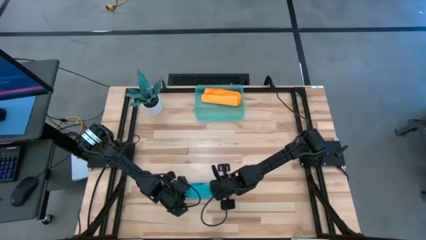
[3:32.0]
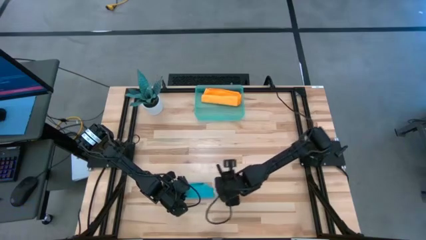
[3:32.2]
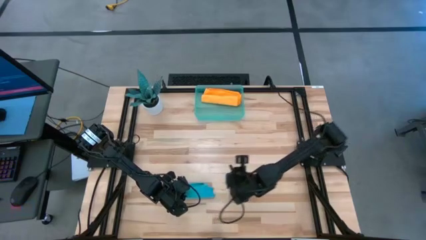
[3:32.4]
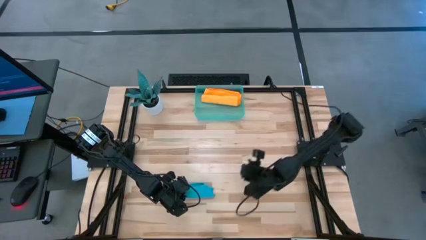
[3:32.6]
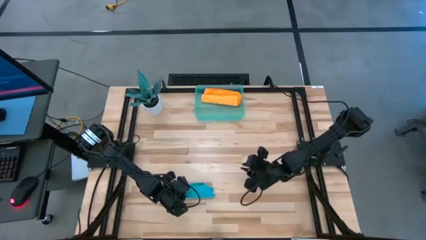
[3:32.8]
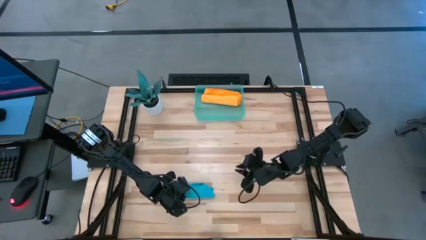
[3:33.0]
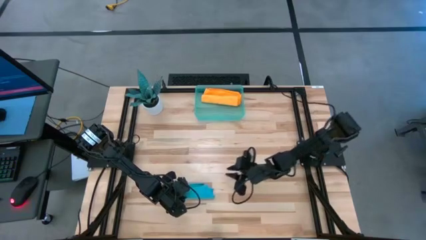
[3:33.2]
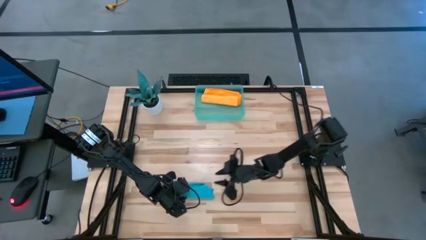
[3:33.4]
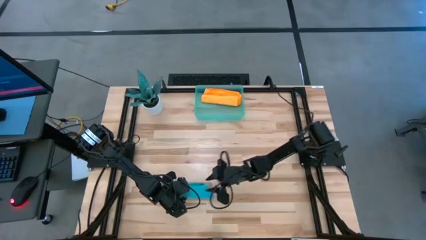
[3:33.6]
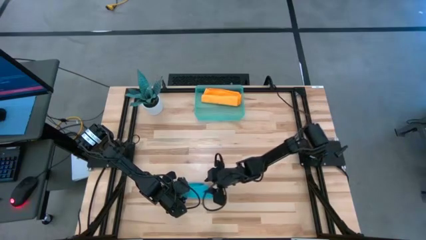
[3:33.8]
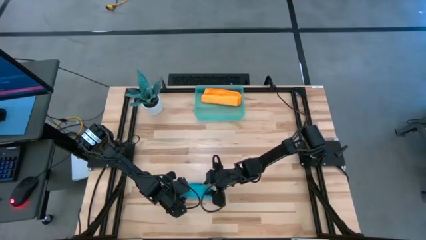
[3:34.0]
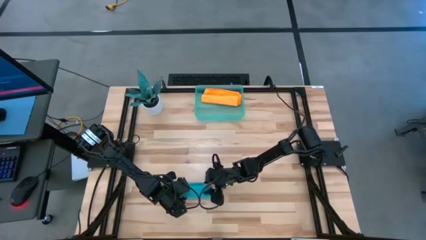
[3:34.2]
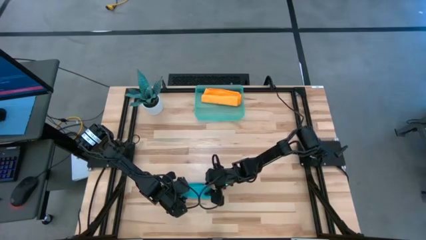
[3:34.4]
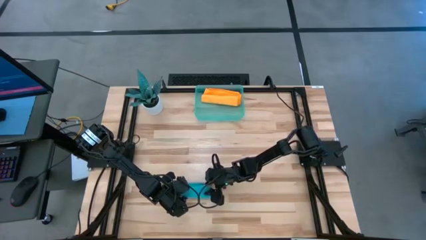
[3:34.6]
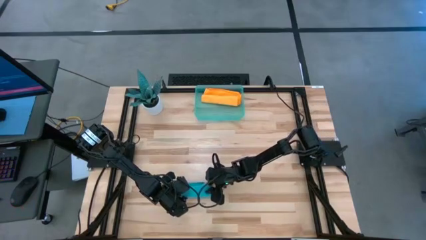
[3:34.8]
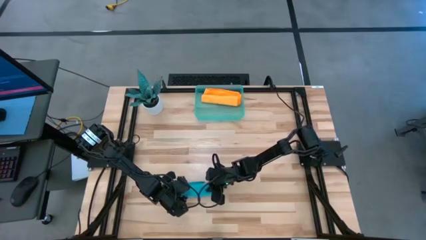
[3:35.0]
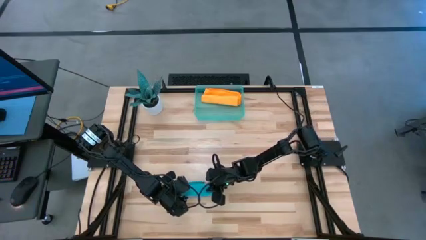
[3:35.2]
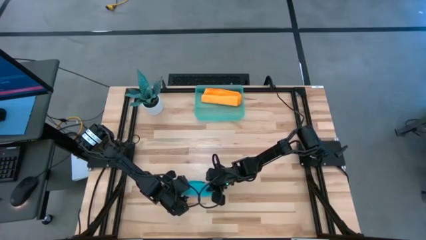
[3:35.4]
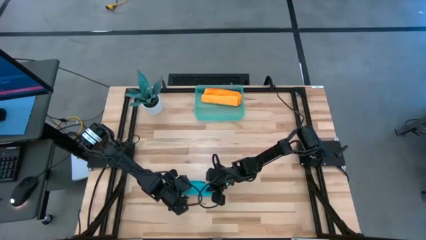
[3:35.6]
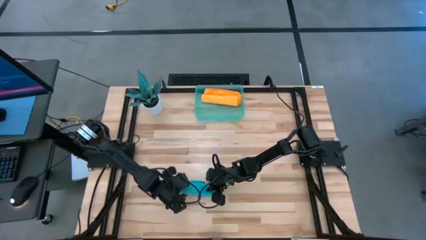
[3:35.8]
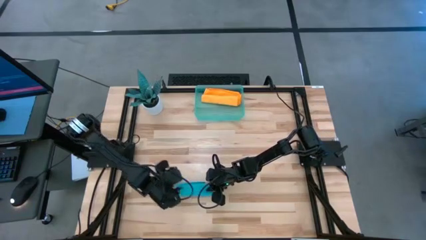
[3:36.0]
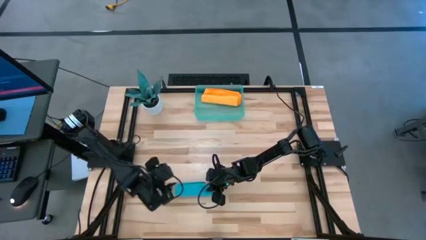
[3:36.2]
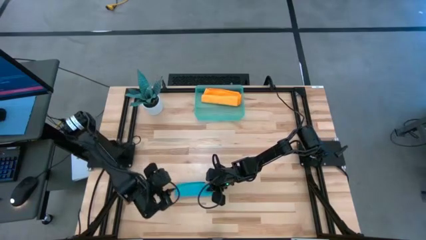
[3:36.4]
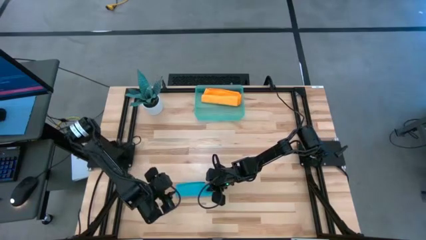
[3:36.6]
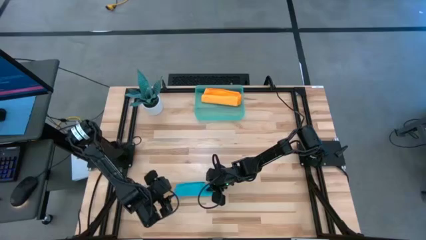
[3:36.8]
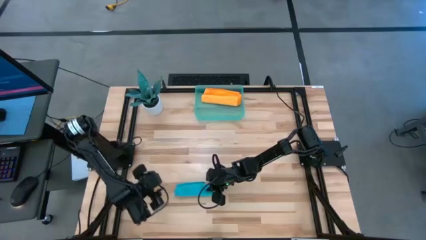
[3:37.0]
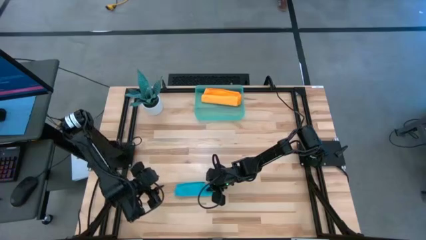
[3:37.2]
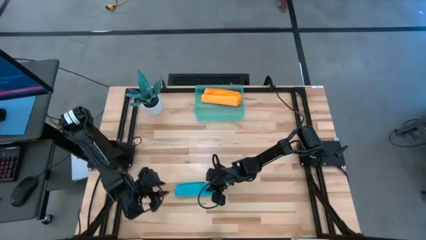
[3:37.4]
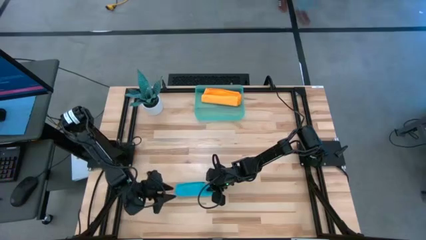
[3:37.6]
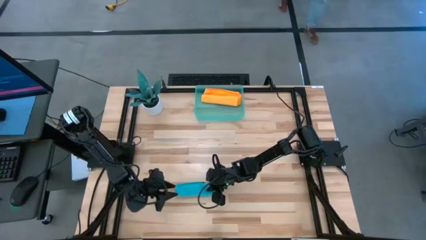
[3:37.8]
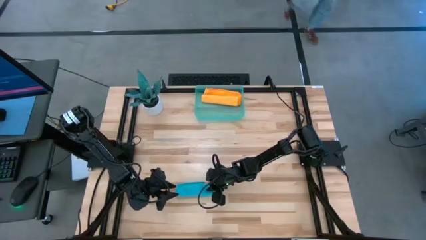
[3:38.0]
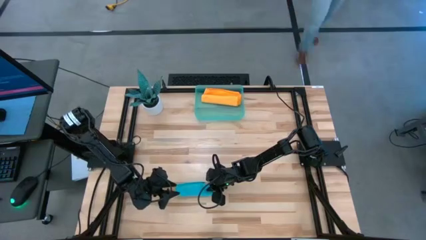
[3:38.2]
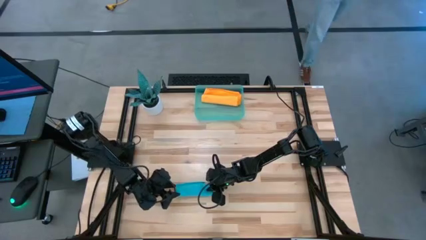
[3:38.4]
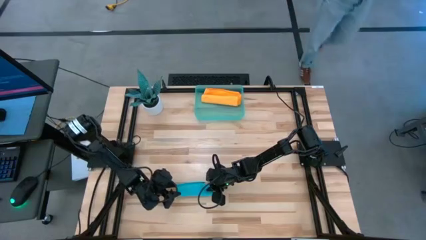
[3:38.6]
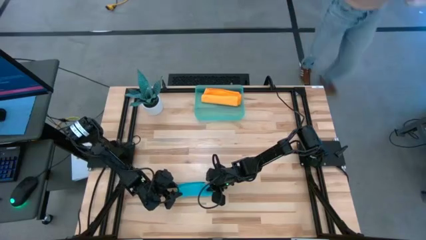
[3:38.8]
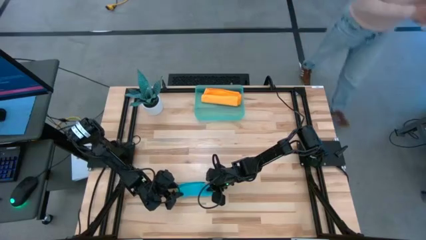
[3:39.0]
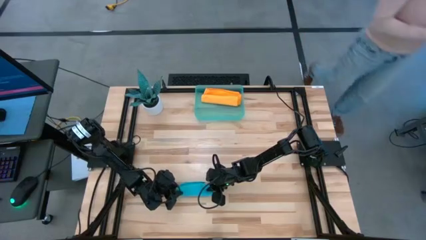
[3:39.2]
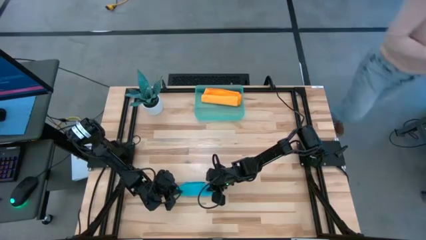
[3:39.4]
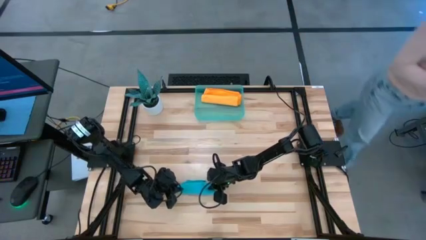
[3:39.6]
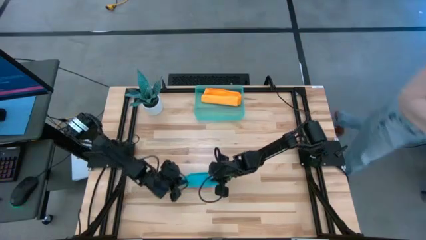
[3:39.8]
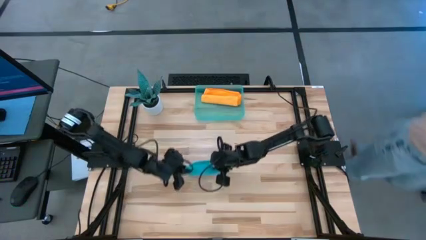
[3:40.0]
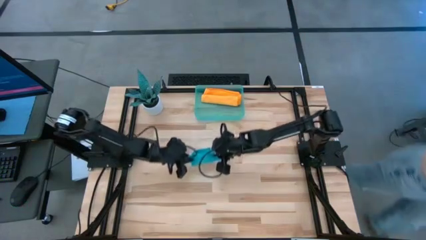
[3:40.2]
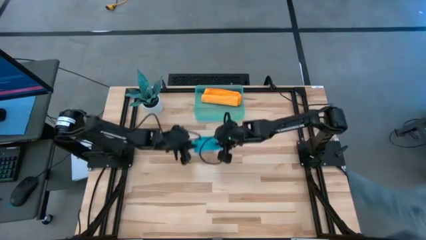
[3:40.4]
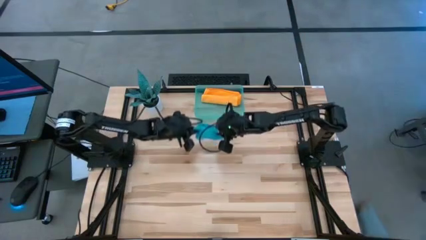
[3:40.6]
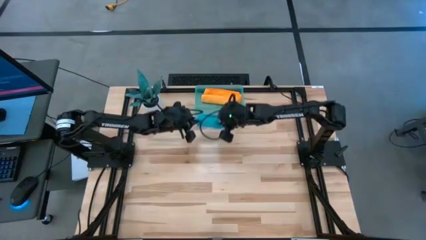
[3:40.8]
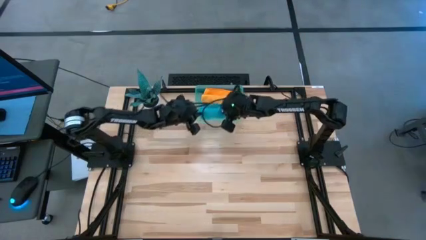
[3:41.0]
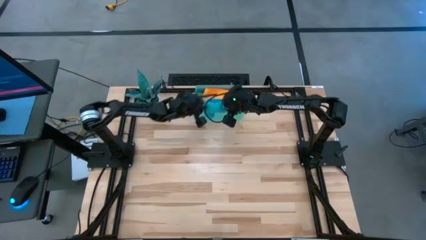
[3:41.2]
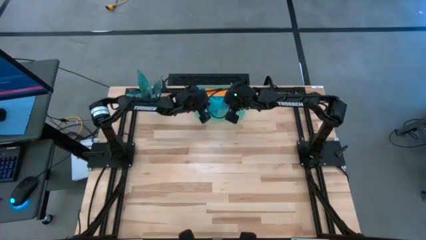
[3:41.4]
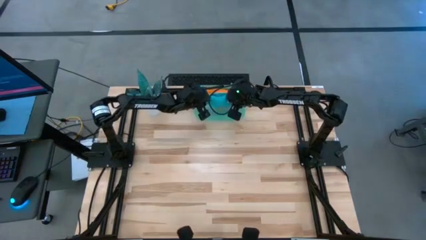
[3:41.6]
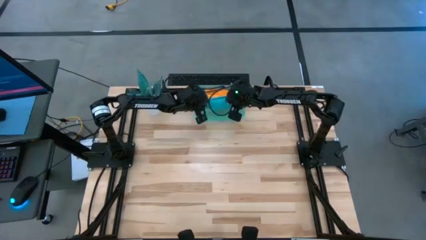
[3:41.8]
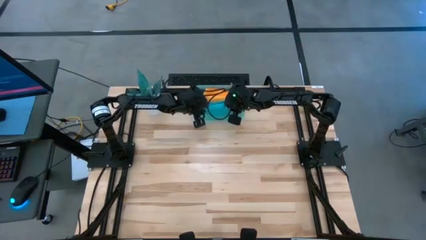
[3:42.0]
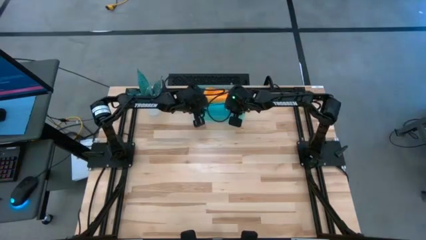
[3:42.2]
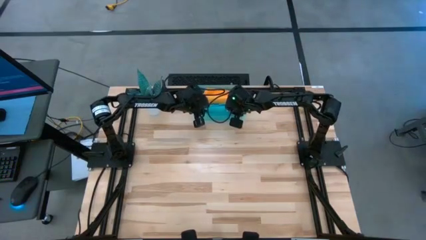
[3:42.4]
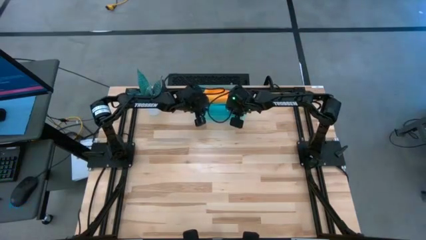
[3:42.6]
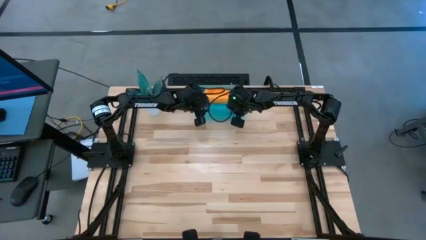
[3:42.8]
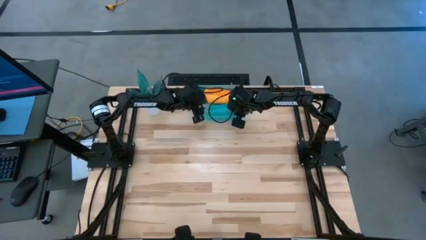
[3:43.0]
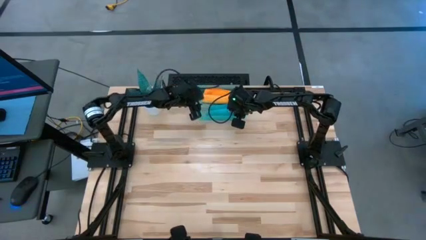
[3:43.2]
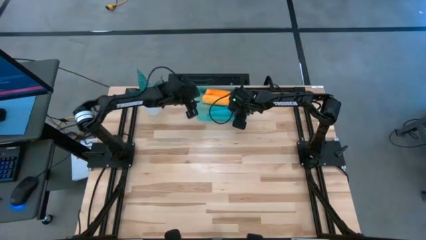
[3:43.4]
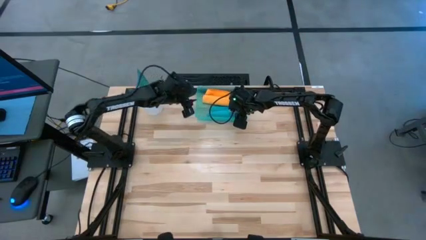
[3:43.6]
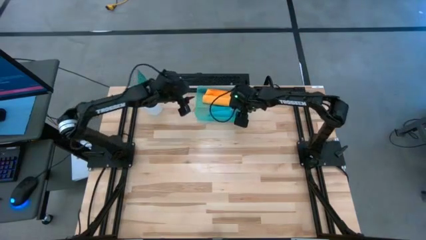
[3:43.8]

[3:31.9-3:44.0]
Task: Roll microfiber towels into tight, uniform cylinder then place into a basket
Put the blue microfiber cloth into the blue bin

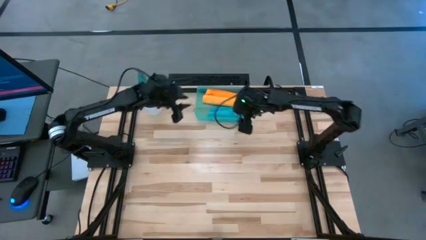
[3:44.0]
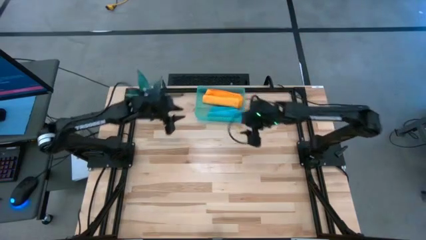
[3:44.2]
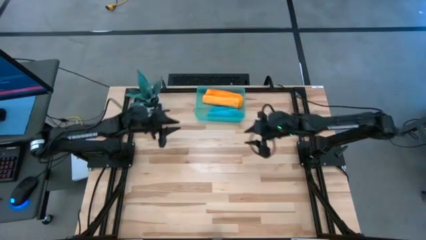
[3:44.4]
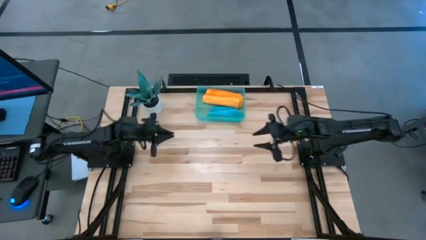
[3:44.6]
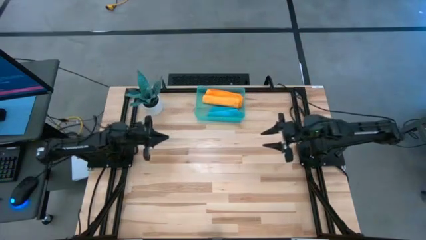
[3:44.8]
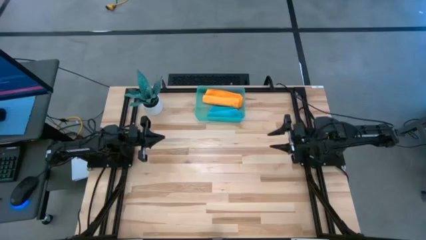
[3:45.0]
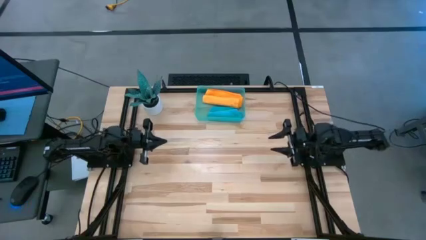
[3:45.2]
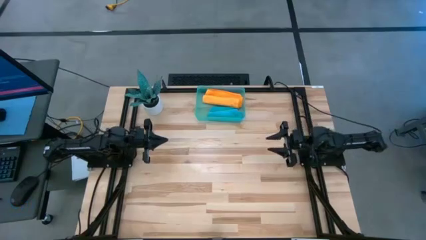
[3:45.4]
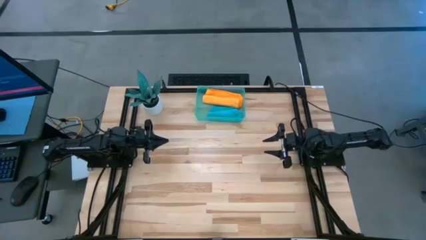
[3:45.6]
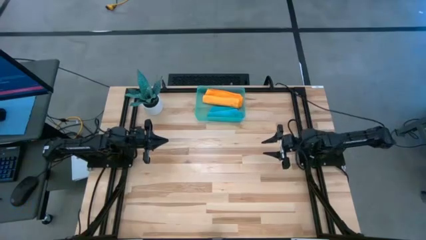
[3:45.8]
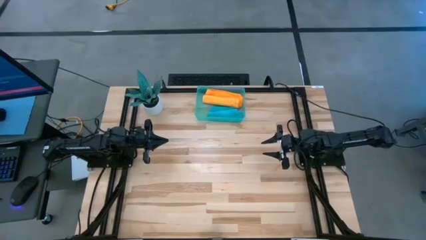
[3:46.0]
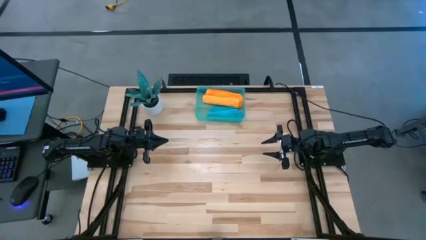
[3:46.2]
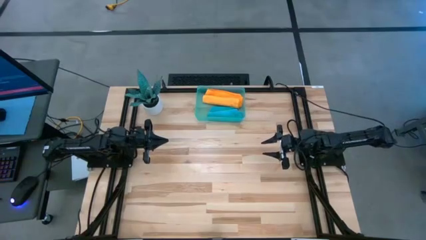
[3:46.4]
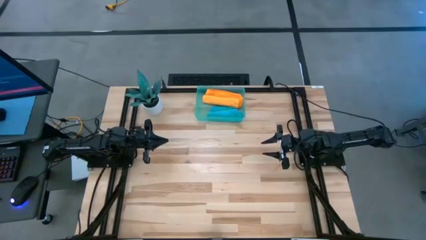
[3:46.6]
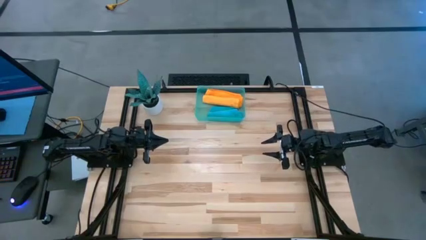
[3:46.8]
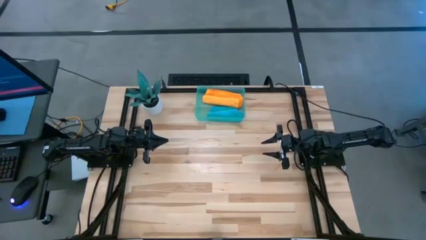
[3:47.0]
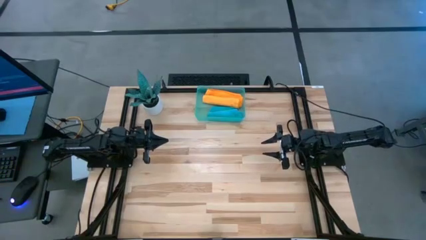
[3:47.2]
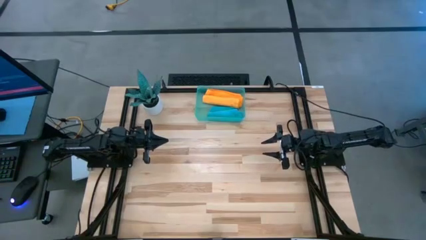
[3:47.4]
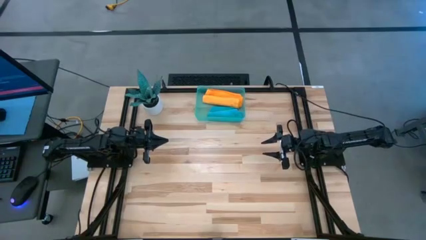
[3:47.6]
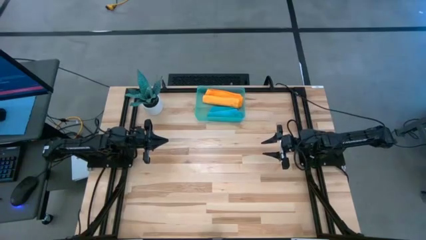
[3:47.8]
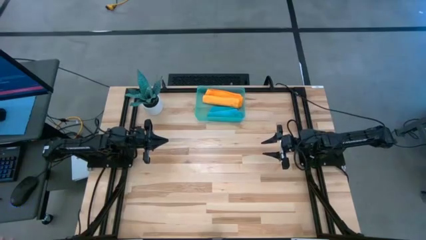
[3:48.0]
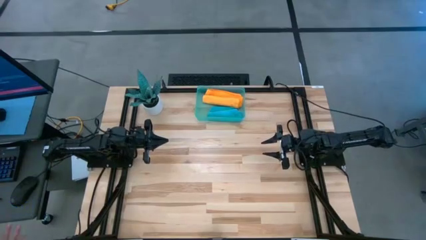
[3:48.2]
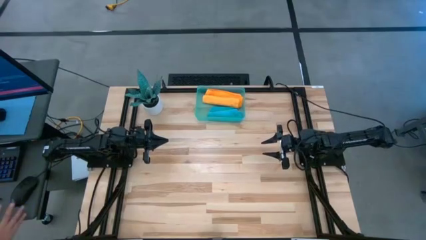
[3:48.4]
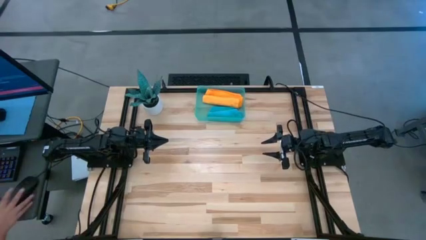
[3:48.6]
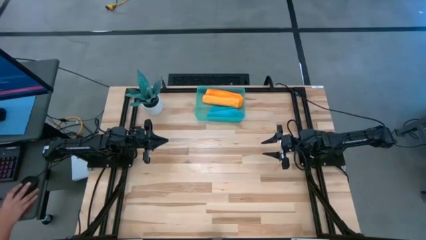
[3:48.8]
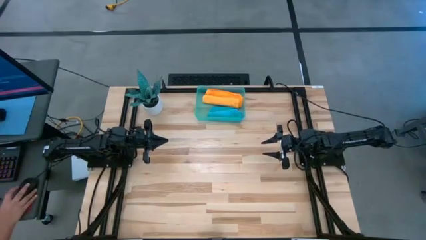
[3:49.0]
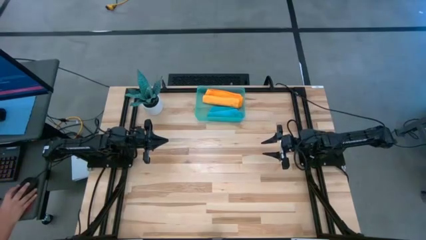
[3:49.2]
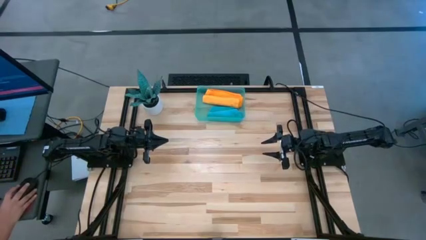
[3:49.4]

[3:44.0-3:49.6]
Return to Home Position
